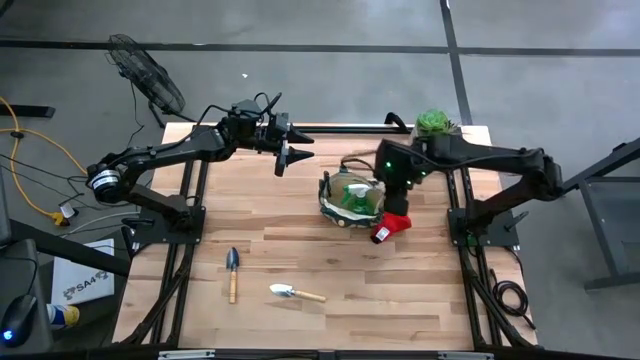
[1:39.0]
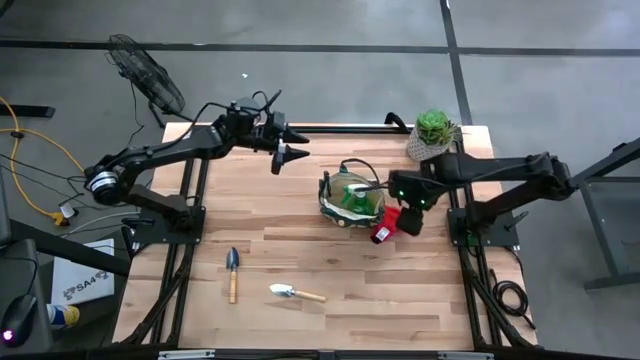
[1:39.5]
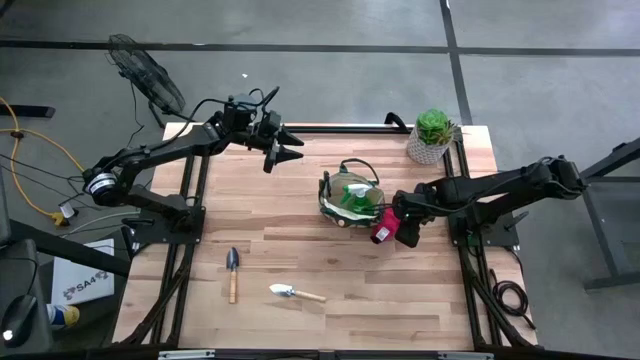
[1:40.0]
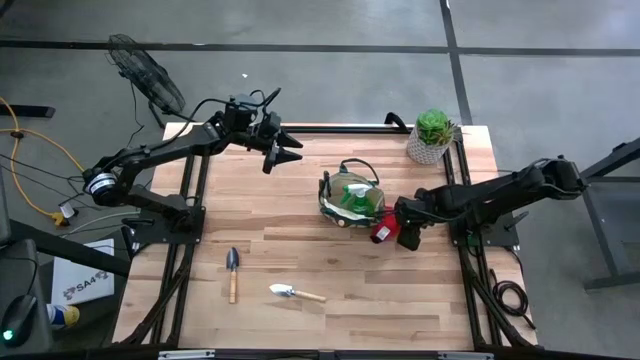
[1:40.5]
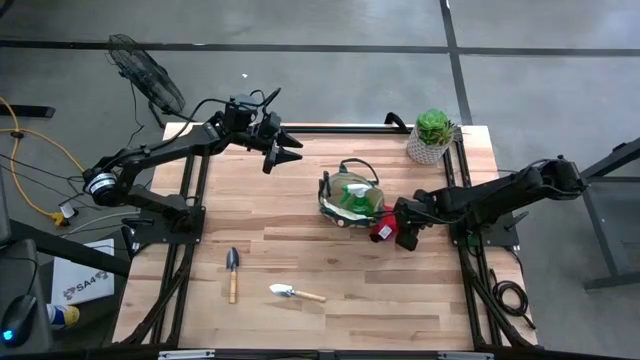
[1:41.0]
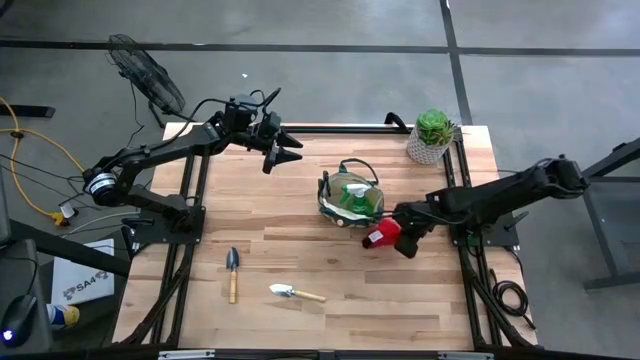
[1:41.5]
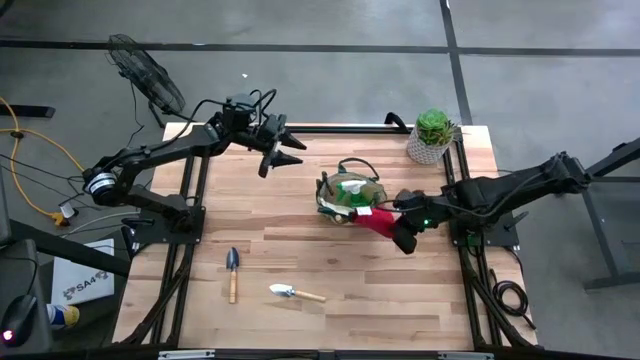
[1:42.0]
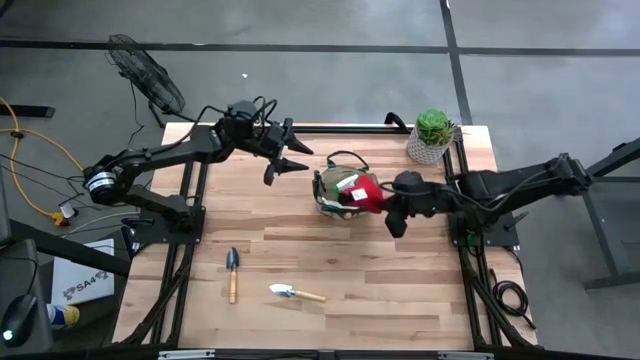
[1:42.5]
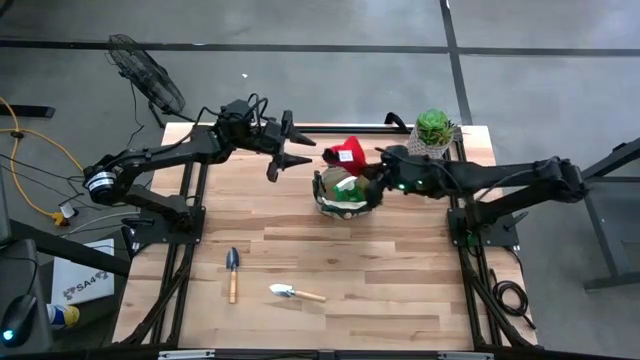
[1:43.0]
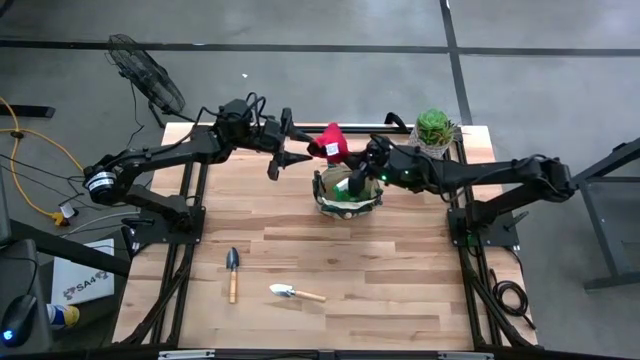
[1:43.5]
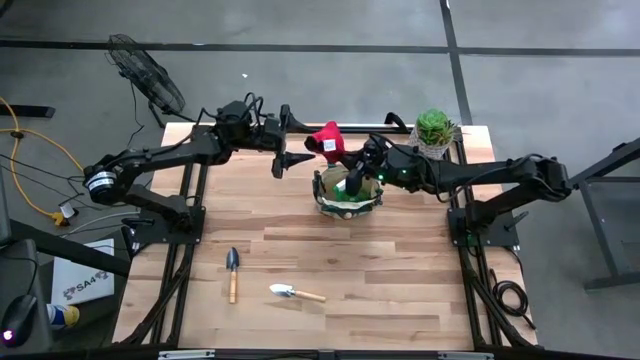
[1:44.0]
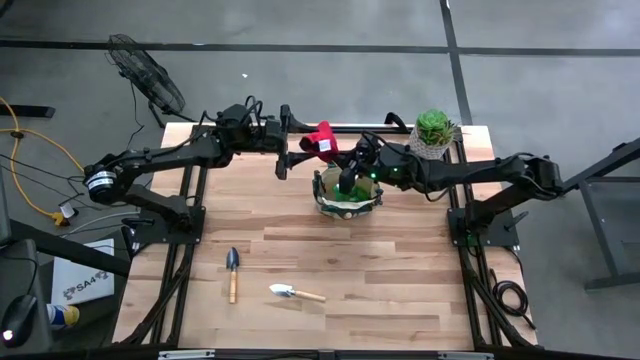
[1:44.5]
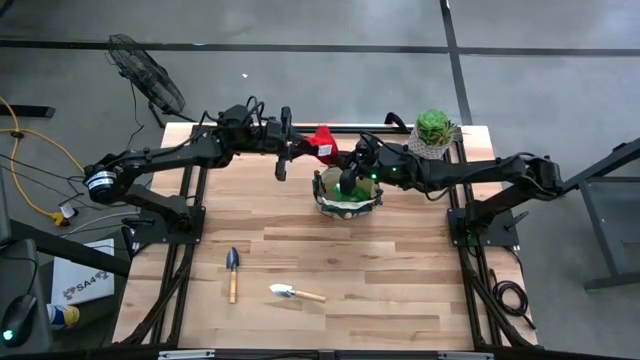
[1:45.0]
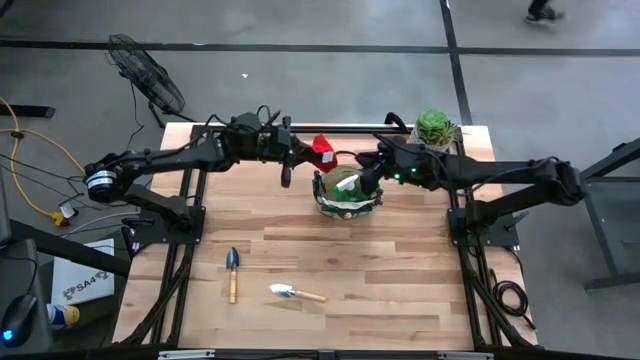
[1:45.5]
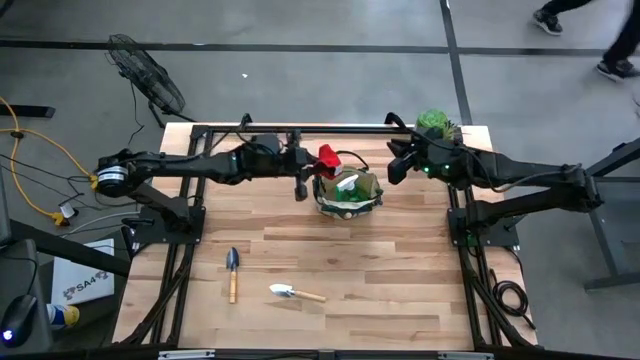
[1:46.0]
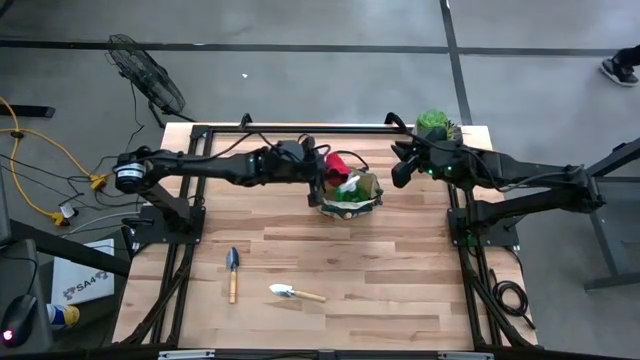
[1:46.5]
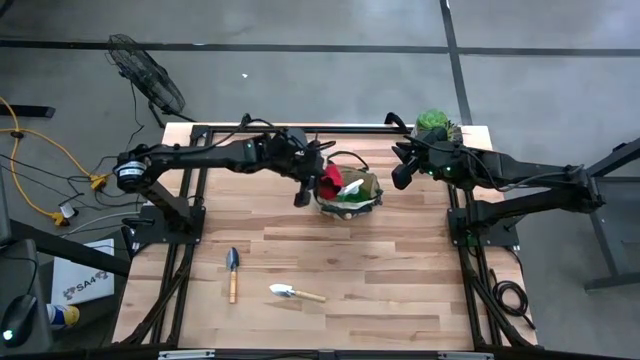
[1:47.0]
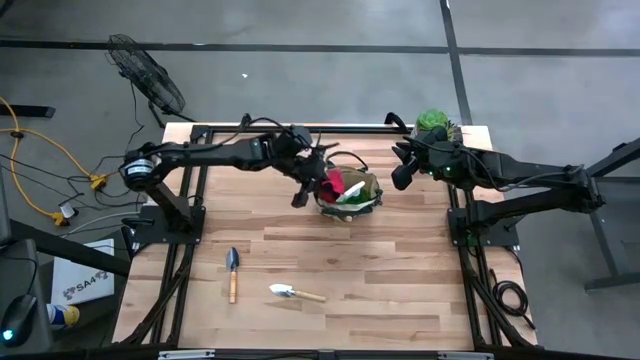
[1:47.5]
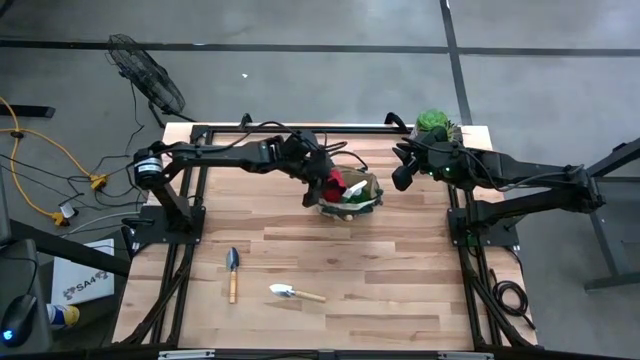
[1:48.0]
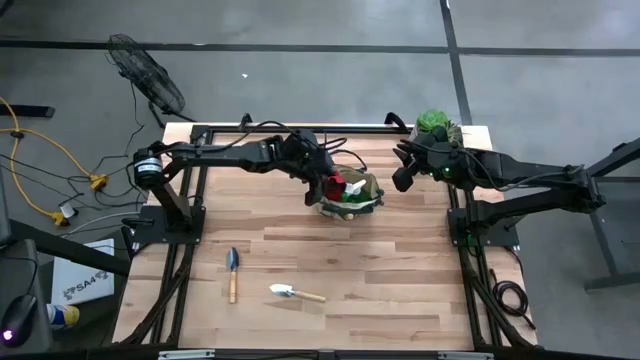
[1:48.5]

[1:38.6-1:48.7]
Task: Pick & Place Garden tools in Gardening bag
Put the red gloves into the gardening bag

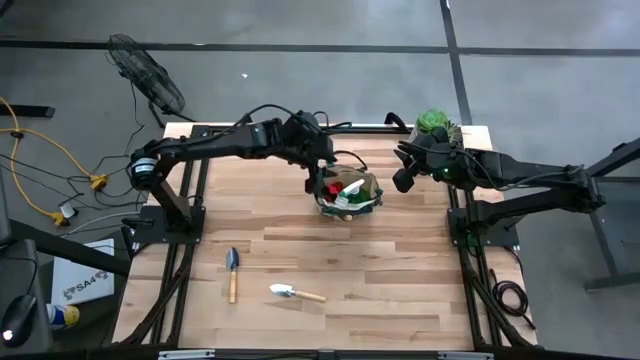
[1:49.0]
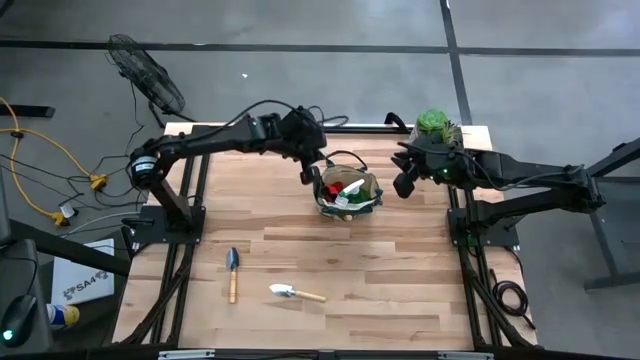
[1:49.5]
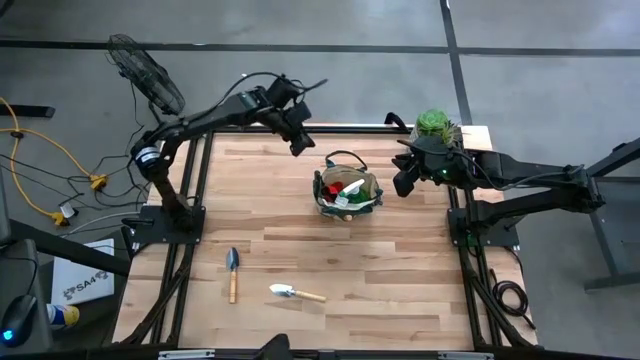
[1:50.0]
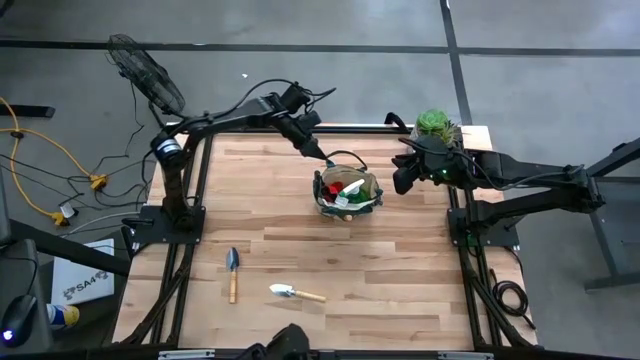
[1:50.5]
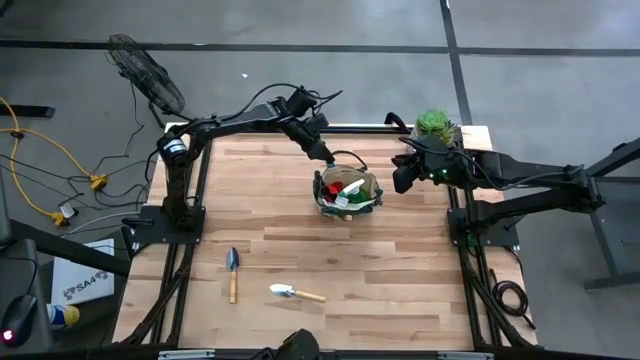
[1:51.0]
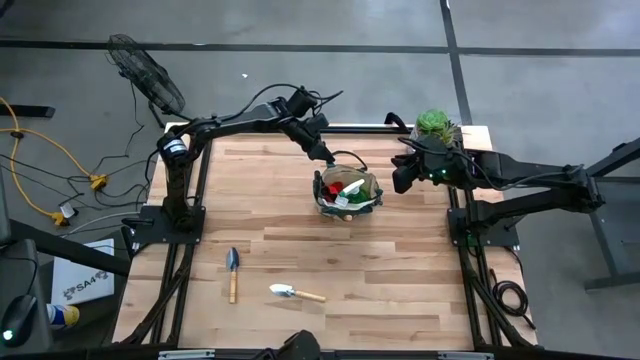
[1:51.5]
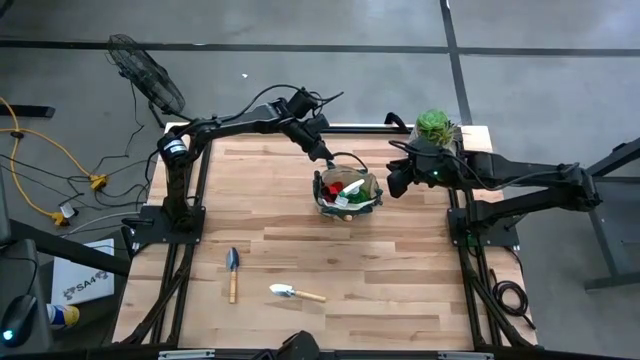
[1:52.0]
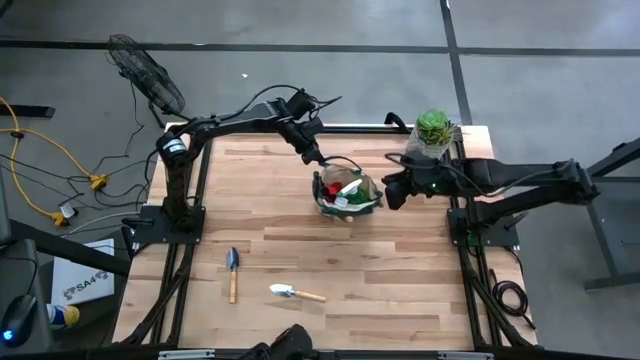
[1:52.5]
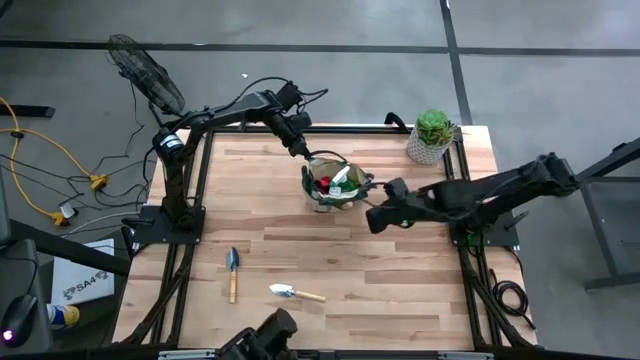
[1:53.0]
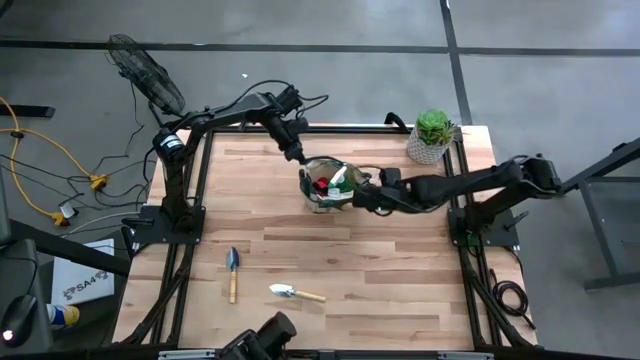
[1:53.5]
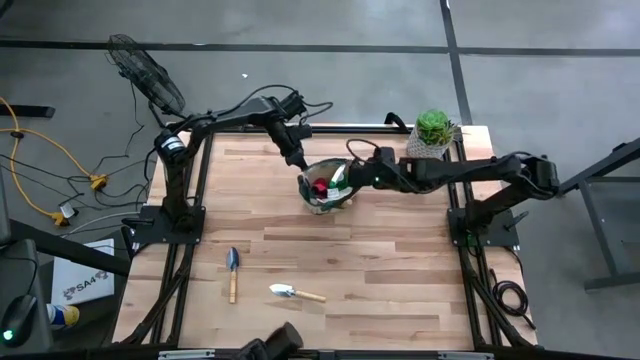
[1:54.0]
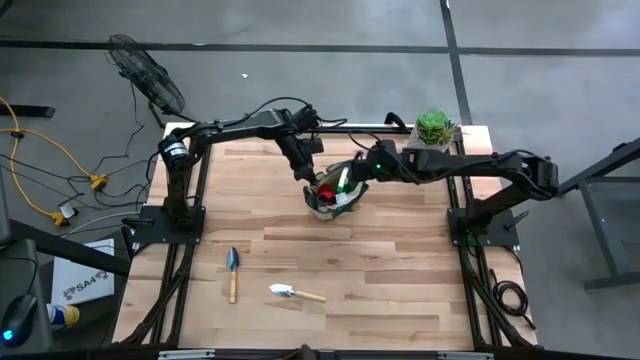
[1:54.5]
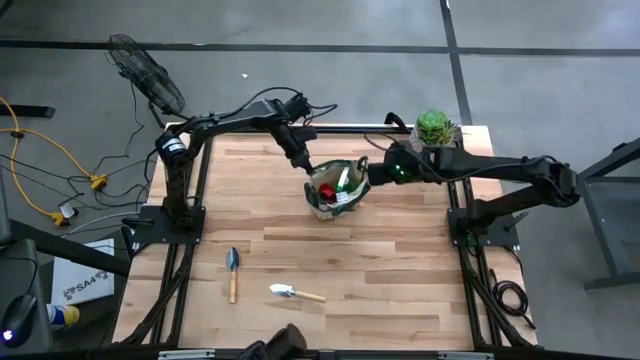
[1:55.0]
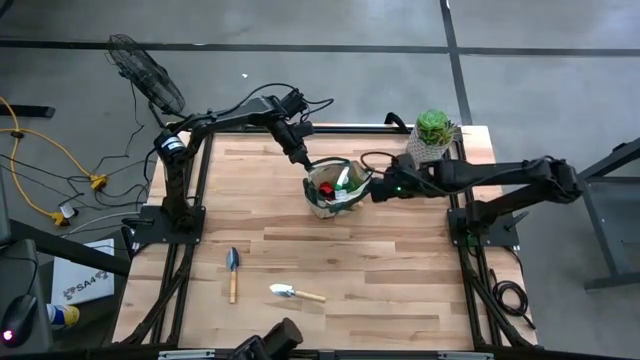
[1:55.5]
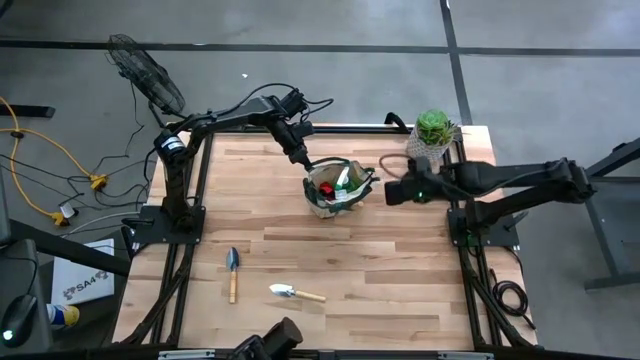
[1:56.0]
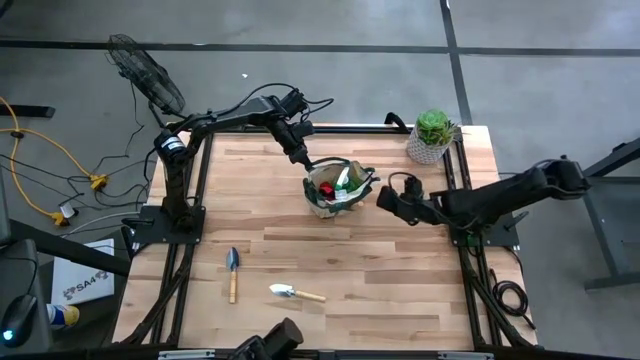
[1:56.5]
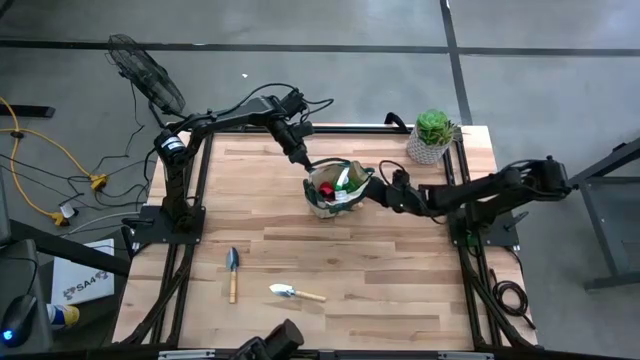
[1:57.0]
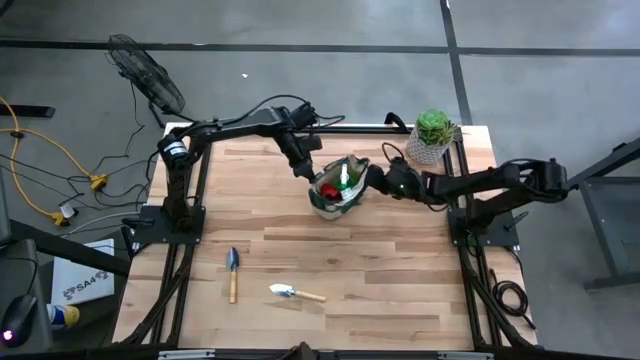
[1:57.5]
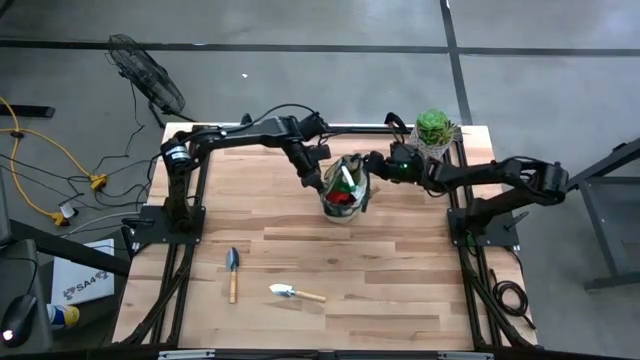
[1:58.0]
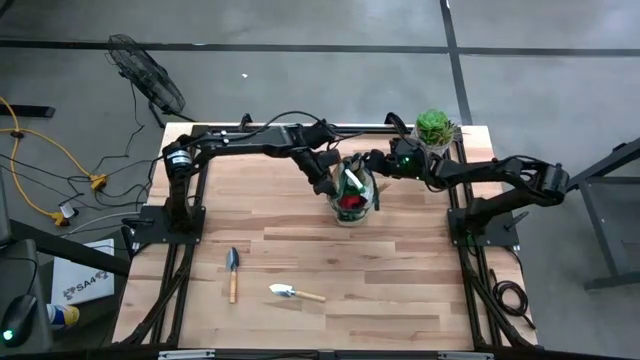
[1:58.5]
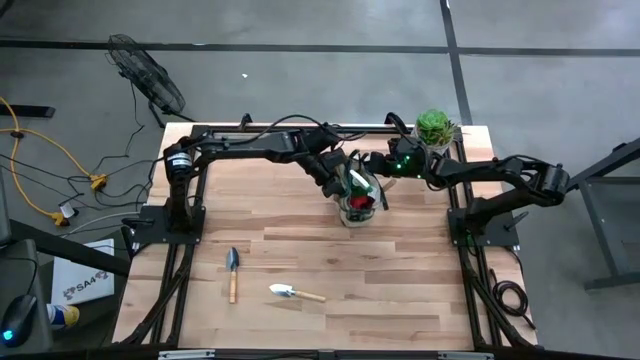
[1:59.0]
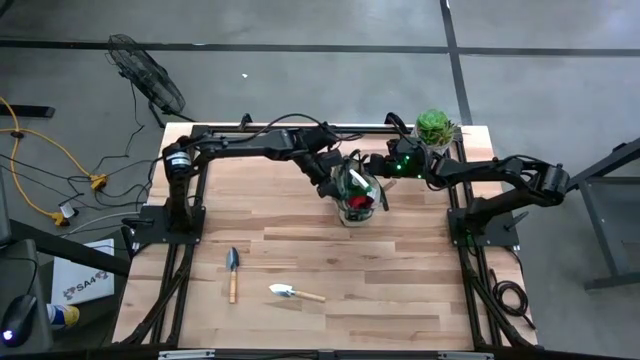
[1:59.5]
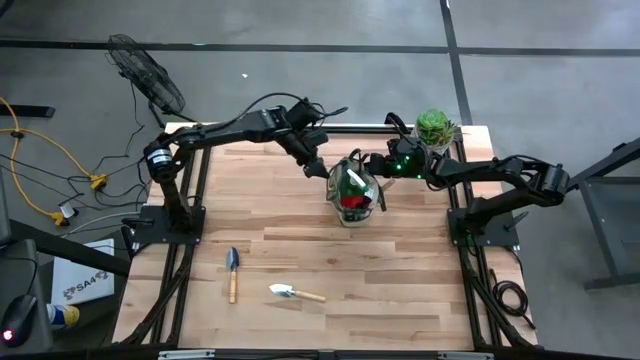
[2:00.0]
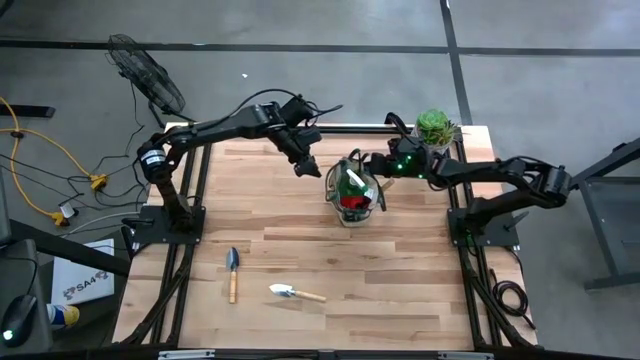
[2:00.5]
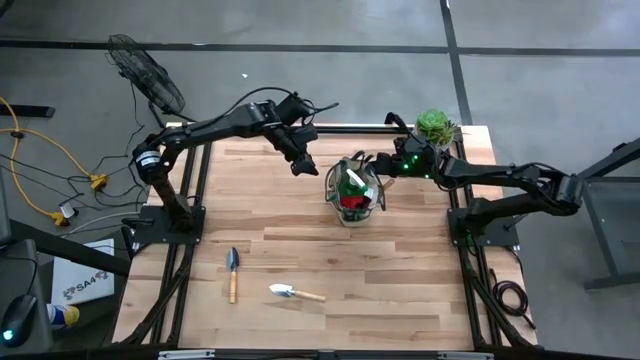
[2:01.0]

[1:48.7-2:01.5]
Adjust the gardening bag
